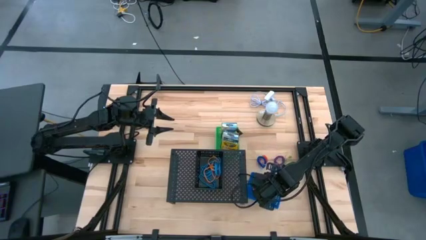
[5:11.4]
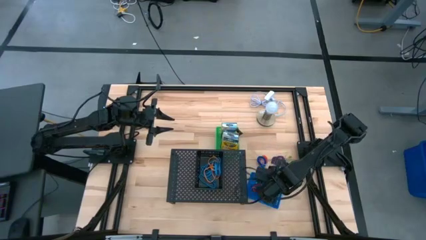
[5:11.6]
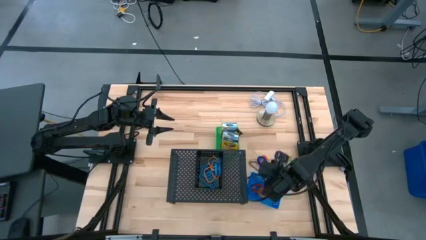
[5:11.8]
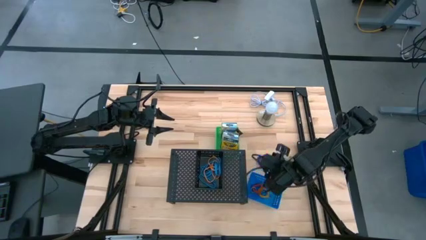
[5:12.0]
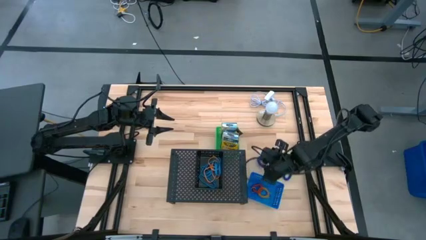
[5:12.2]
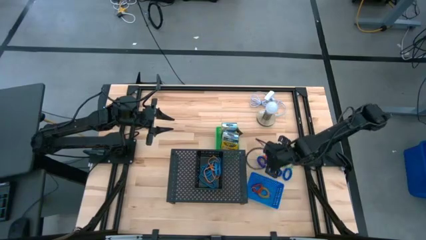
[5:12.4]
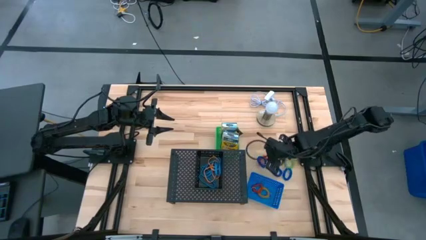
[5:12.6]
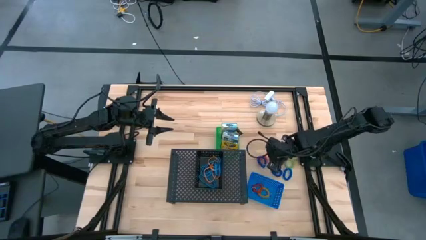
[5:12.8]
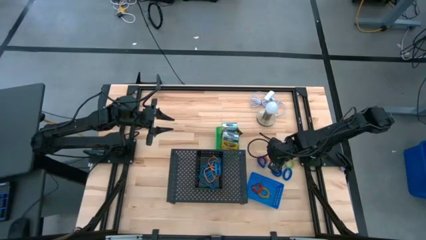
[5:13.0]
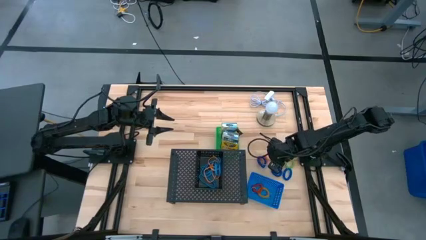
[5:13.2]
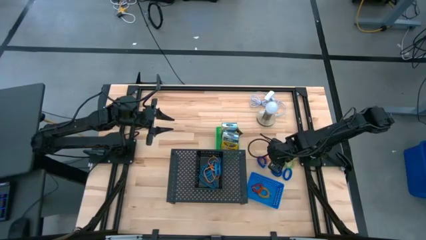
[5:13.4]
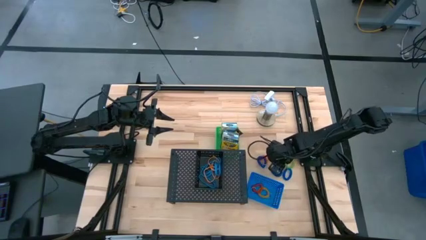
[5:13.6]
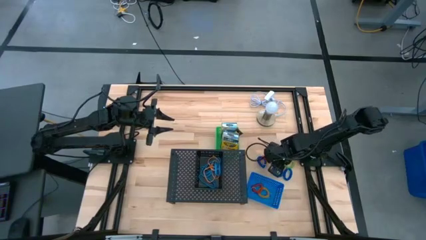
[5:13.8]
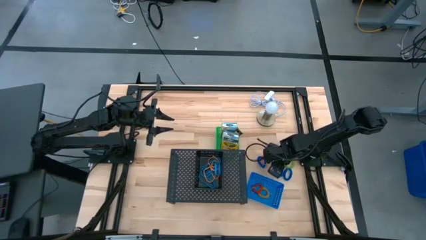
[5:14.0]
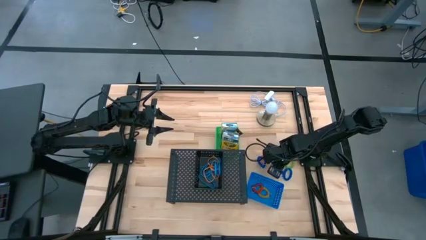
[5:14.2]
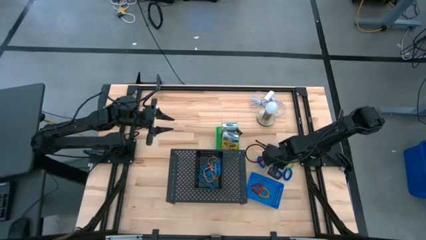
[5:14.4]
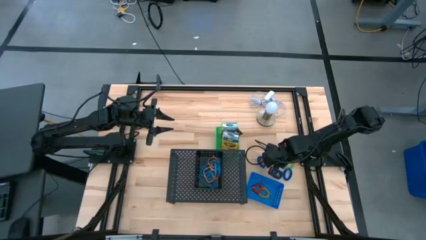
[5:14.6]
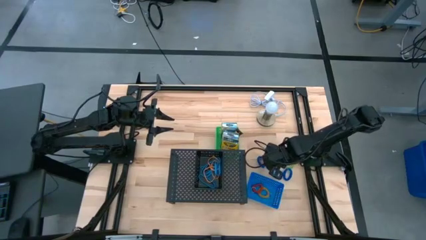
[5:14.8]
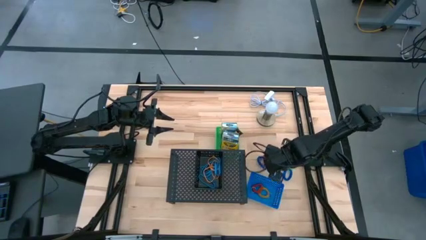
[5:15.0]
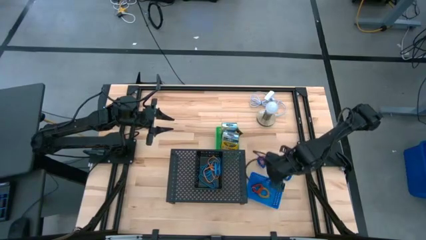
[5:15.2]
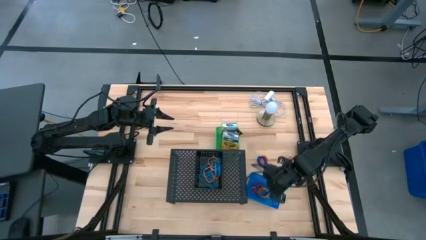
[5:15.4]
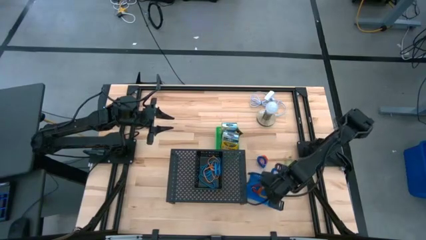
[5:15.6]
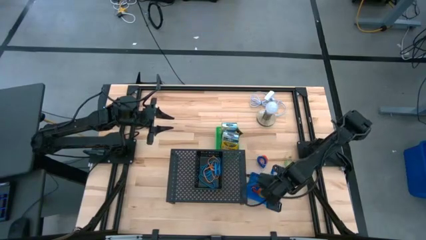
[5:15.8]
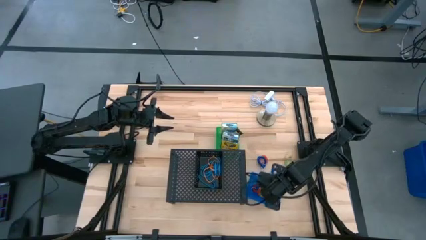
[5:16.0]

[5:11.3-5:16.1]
Task: Pick & Place Office Desk Supplies
Put the violet spring keychain into the blue bin

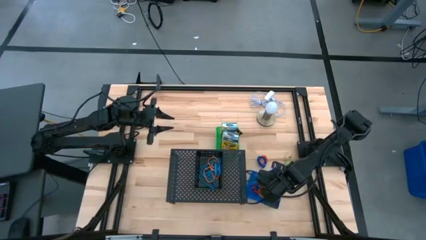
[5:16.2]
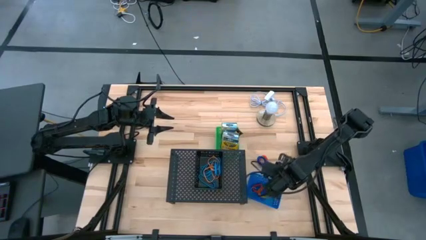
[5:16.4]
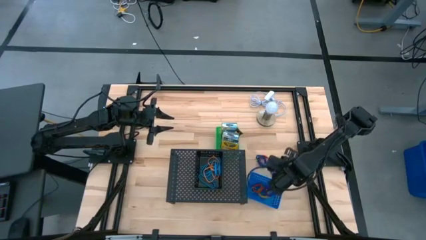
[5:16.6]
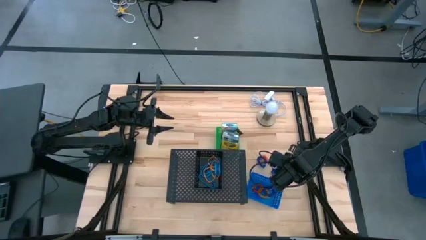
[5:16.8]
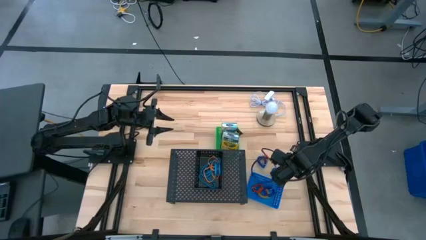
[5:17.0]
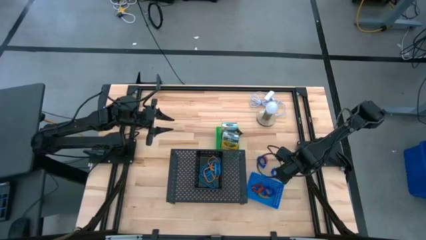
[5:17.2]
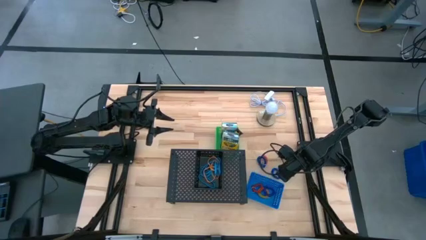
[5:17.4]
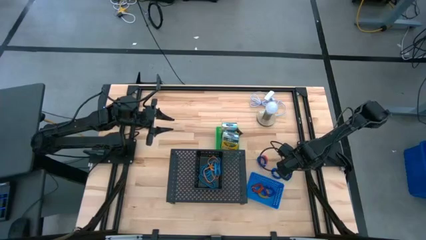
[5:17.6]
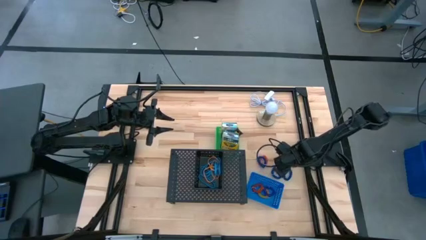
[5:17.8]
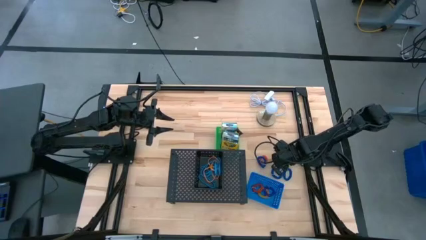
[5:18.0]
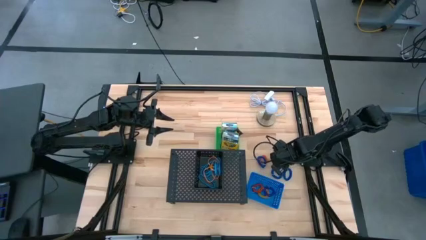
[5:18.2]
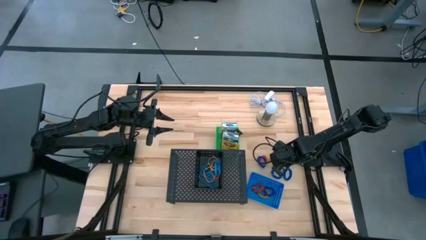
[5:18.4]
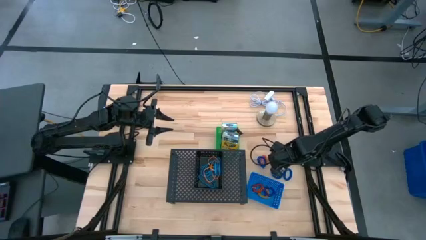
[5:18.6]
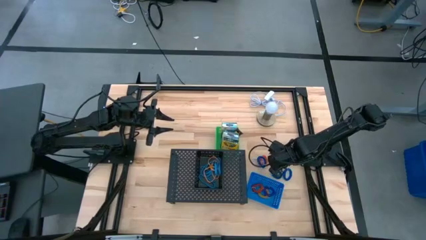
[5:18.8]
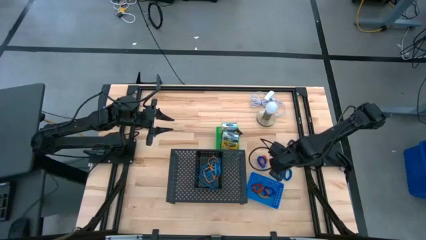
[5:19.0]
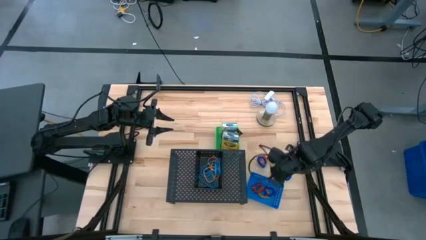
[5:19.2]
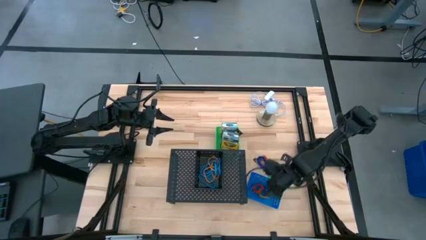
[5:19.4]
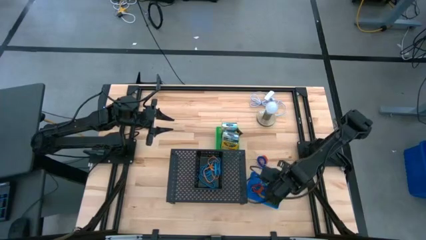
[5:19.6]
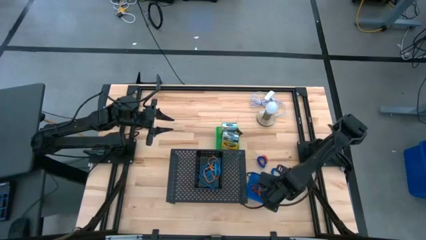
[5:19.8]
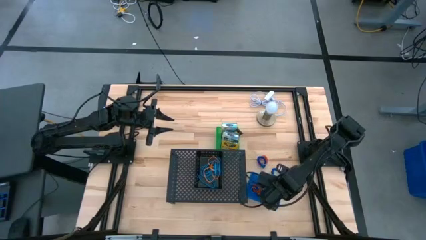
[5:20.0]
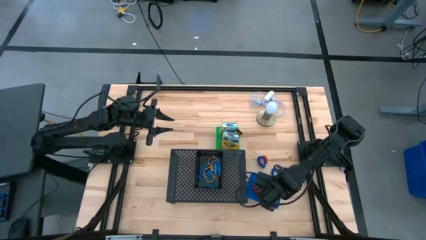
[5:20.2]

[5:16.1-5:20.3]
Put the green spring keychain into the blue bin

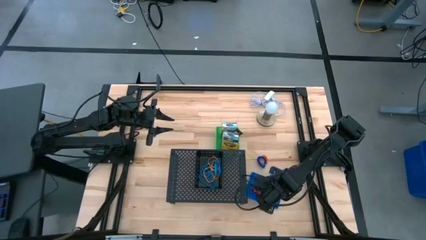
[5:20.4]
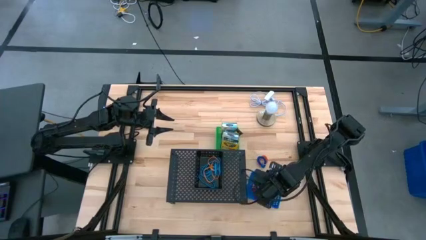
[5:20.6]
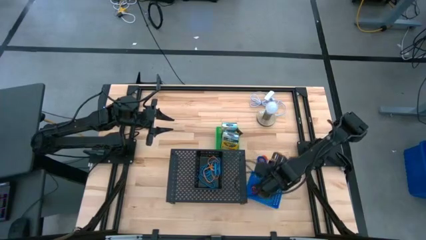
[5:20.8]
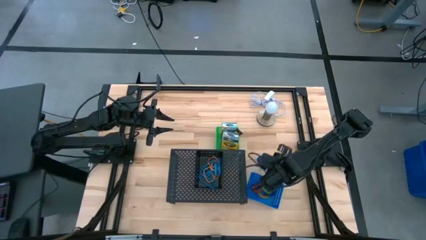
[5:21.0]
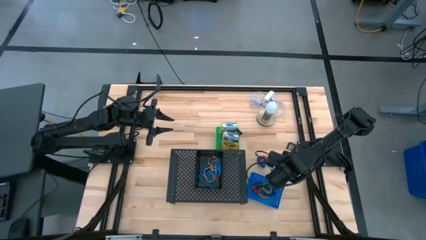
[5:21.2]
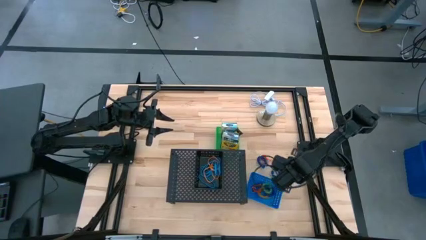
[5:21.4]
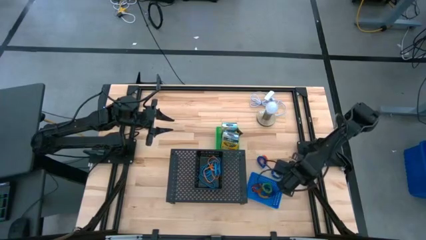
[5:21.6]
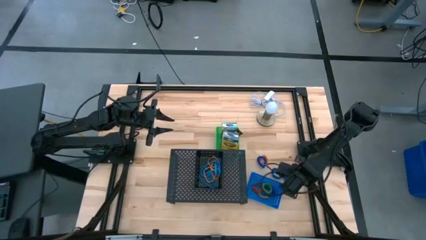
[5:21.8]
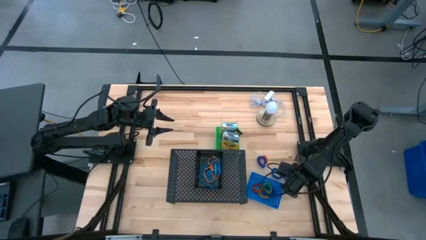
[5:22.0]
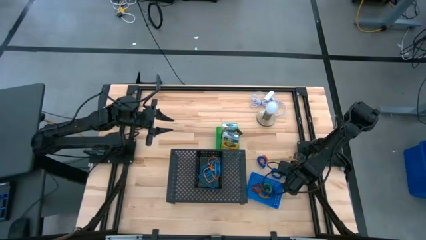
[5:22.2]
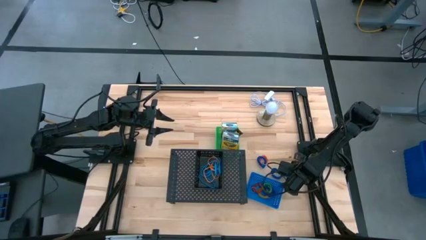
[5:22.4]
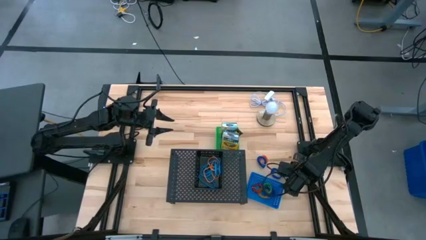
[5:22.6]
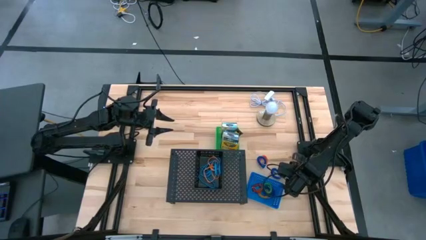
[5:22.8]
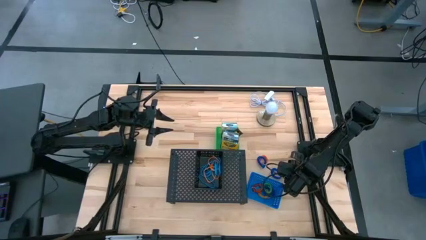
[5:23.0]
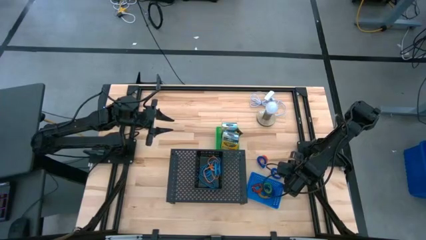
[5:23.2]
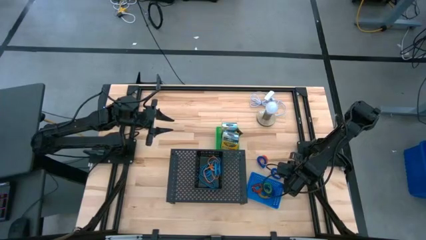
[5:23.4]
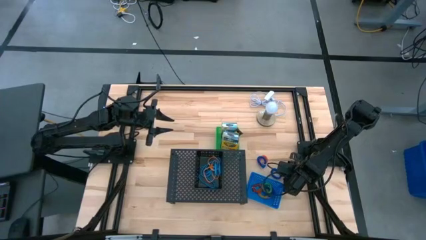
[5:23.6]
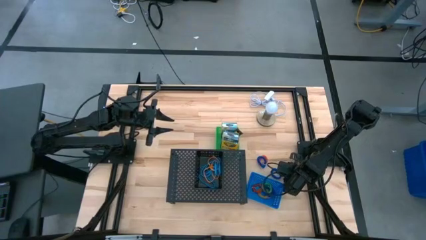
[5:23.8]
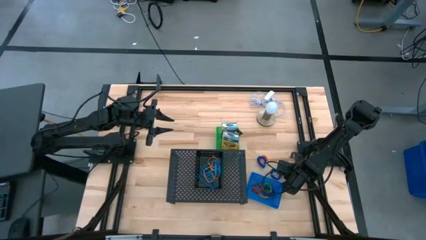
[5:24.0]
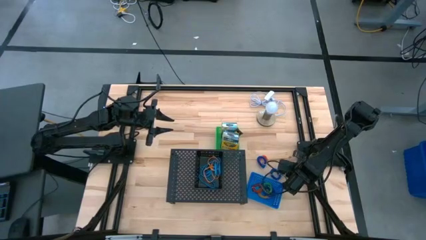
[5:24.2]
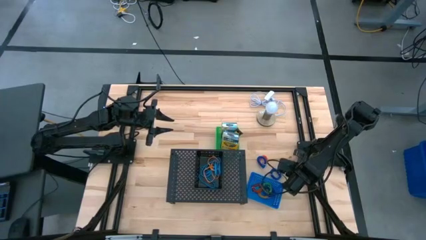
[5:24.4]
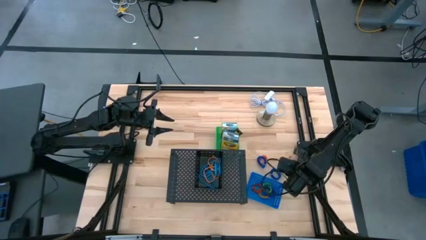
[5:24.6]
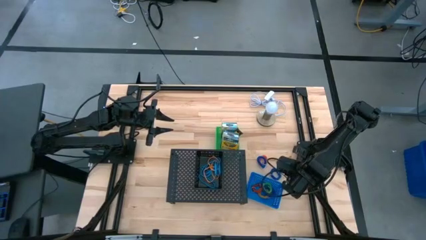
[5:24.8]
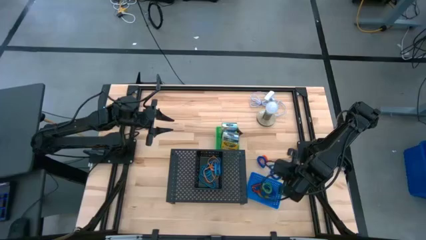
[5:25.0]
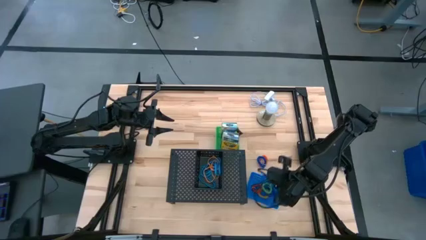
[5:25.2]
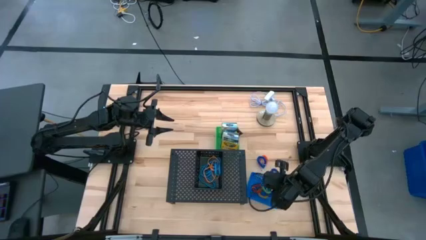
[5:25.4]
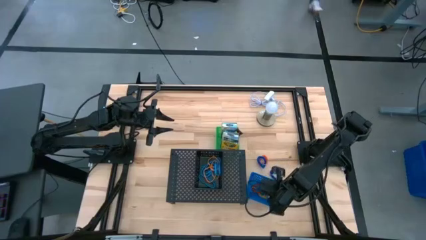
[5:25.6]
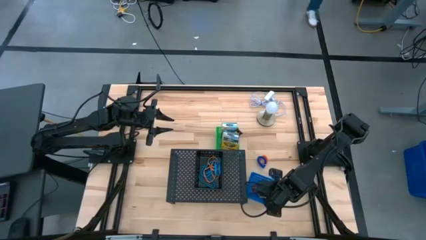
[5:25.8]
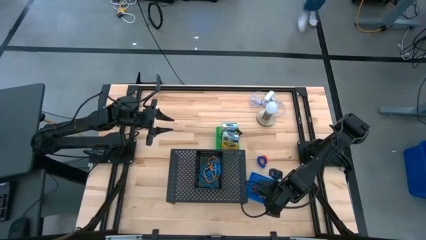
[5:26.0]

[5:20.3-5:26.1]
Put the right blue spring keychain into the blue bin

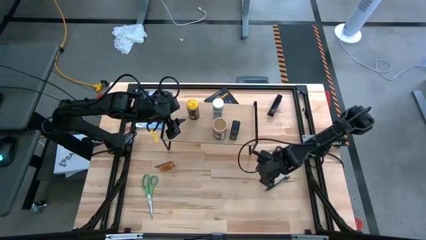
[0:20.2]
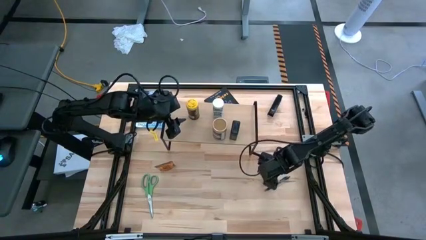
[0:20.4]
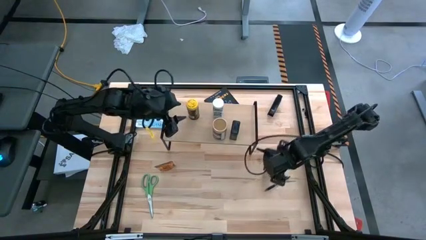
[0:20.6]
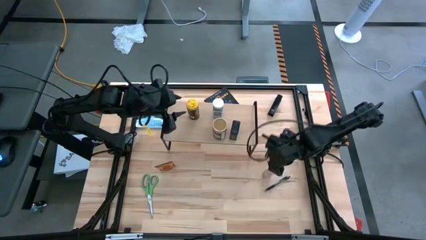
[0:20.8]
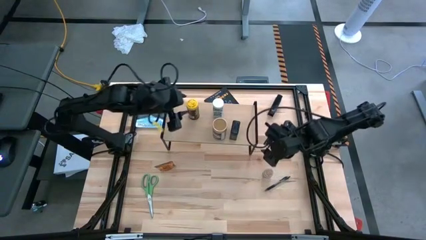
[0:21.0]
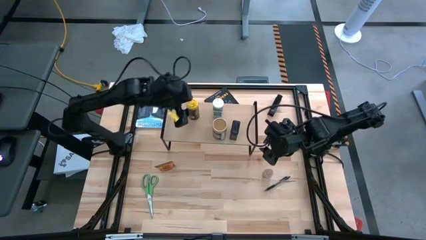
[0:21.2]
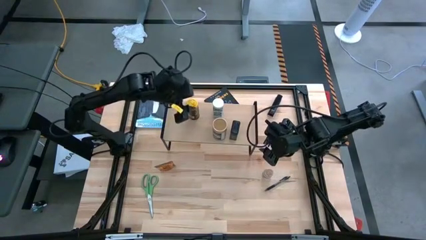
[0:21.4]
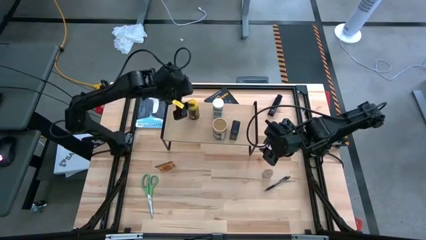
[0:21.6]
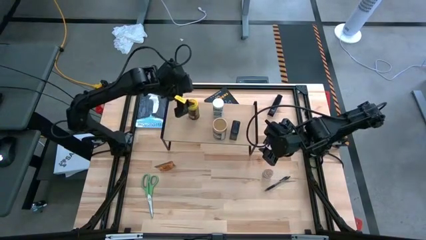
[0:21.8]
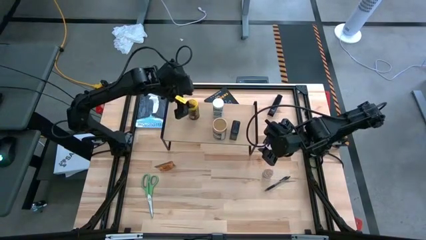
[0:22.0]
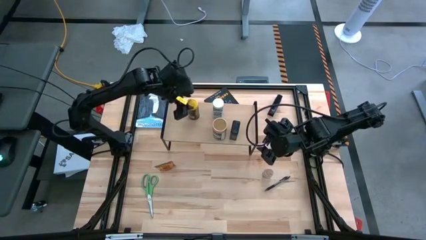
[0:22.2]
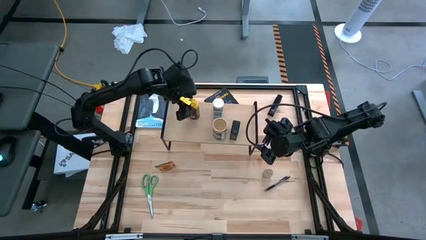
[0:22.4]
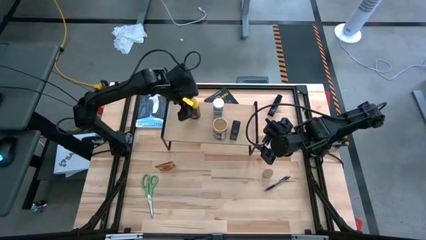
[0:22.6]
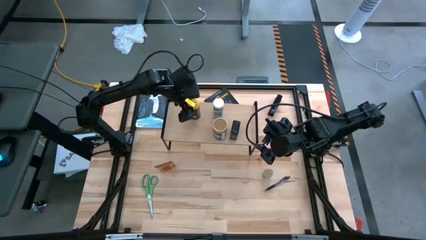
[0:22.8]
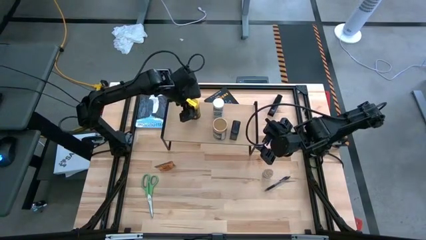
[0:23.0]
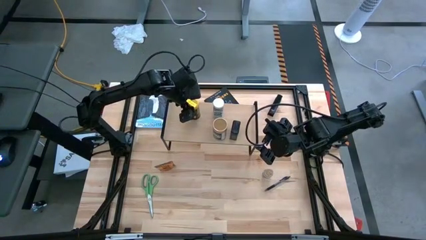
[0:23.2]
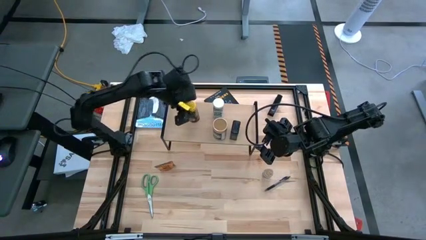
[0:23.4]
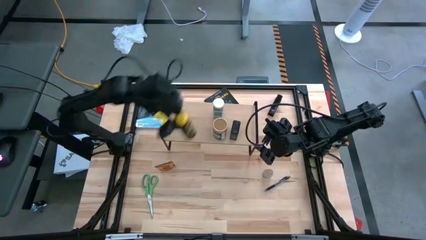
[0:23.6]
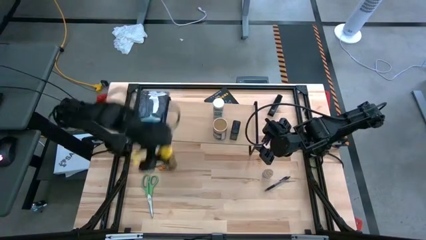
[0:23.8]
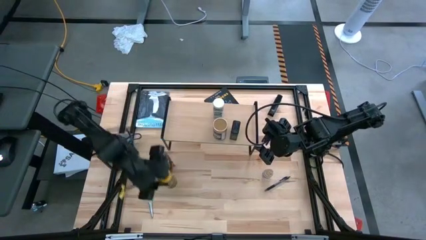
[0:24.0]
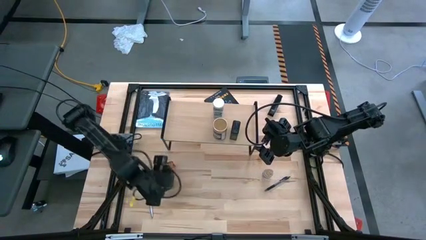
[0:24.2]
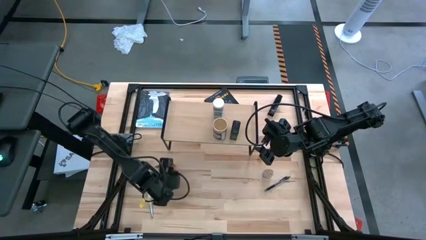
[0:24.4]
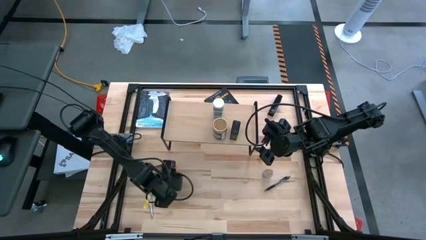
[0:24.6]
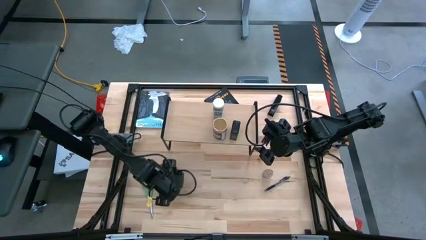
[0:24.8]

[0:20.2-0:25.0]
Task: Shelf spices
Remove the yellow seasoning bottle from the shelf
